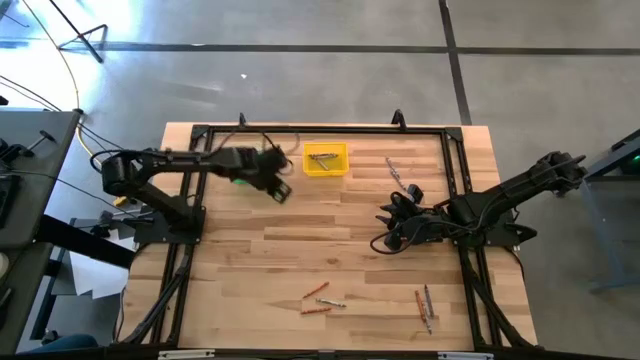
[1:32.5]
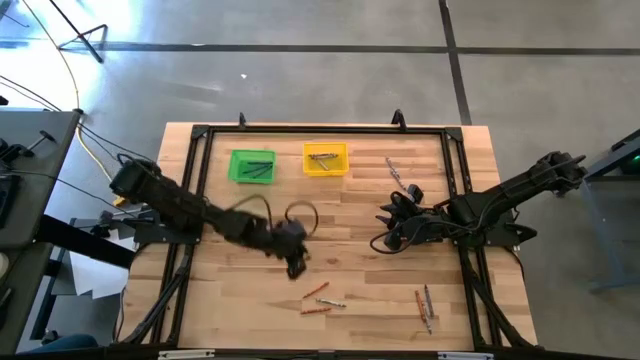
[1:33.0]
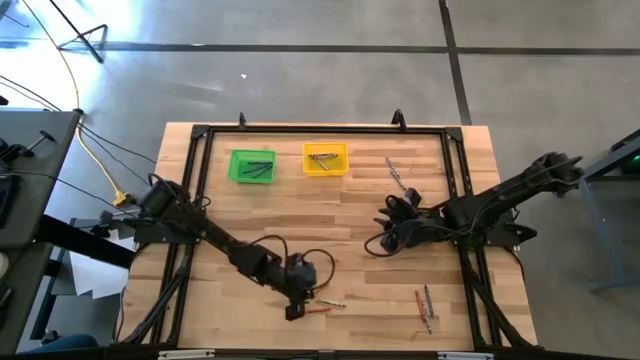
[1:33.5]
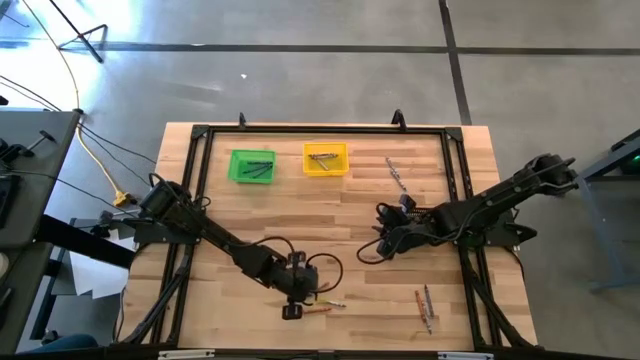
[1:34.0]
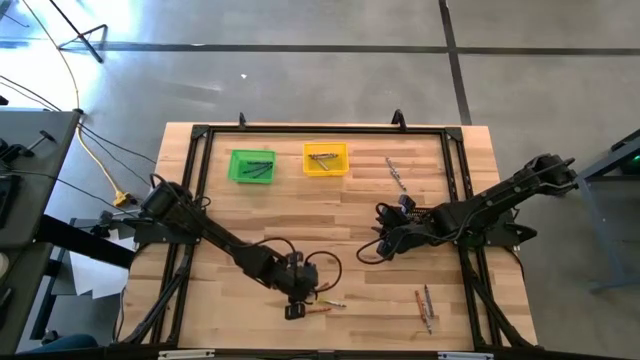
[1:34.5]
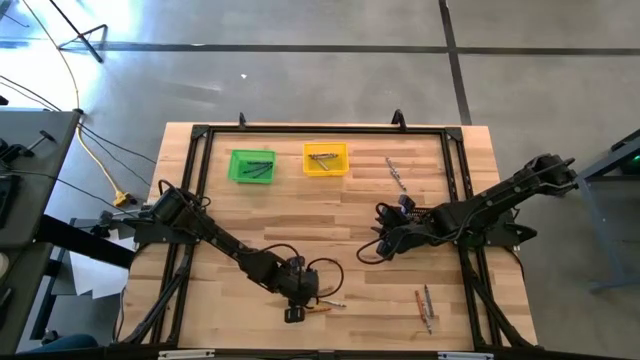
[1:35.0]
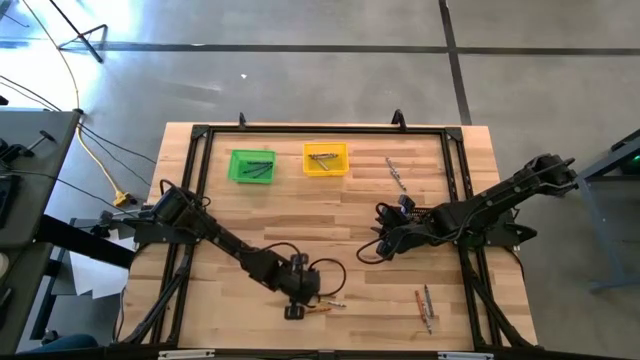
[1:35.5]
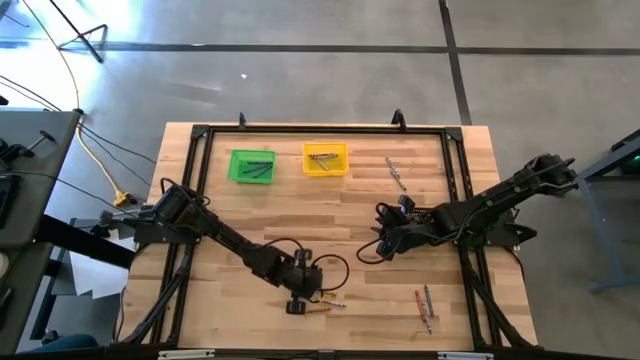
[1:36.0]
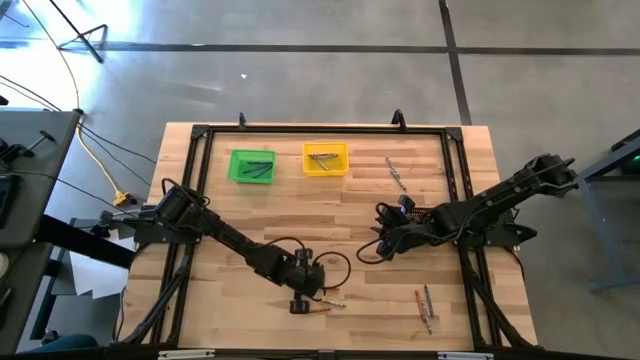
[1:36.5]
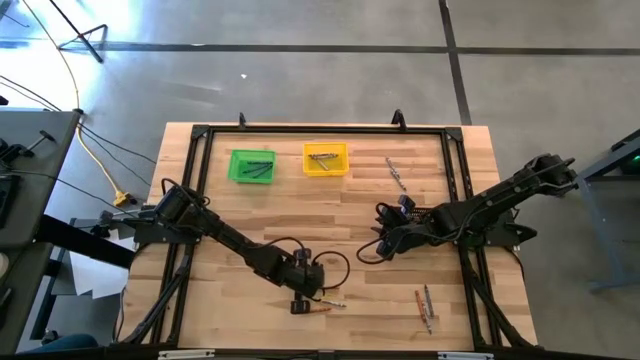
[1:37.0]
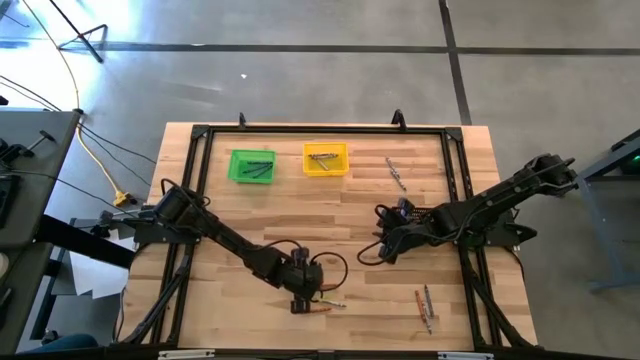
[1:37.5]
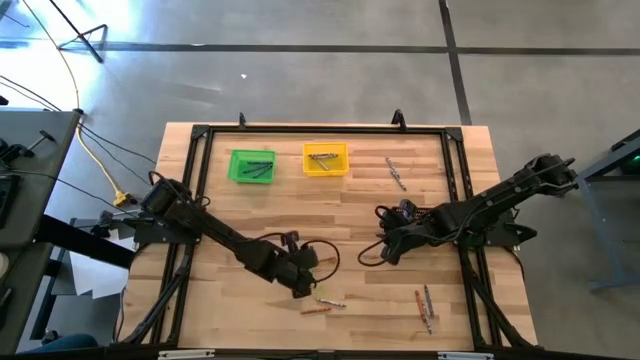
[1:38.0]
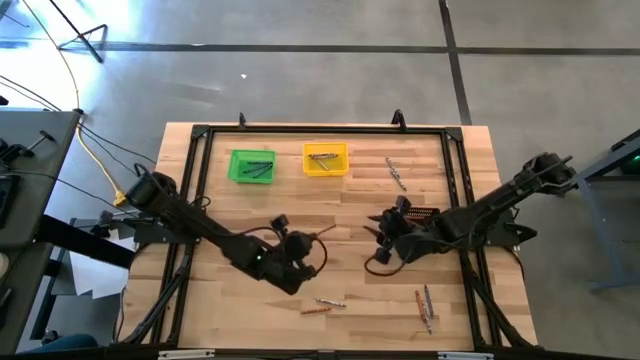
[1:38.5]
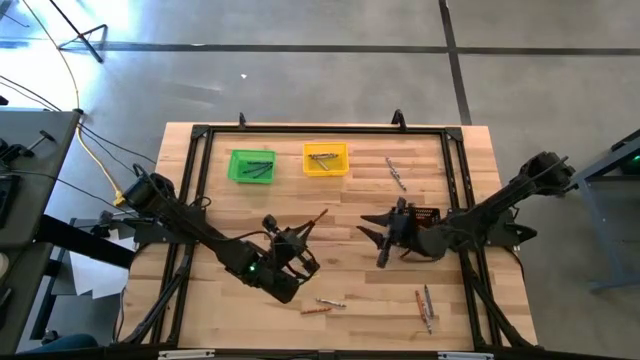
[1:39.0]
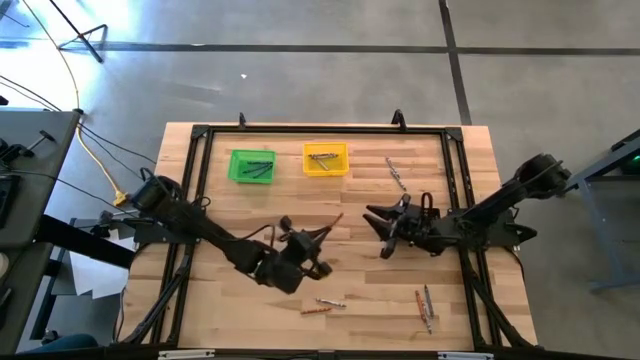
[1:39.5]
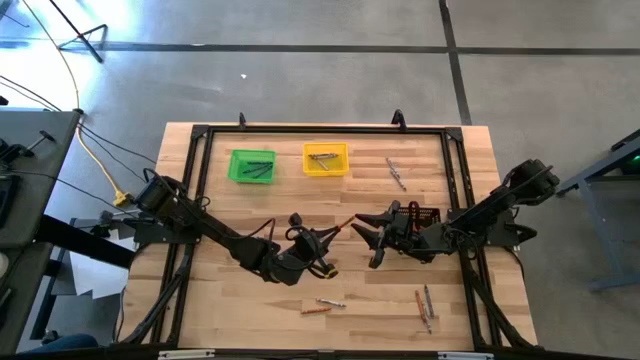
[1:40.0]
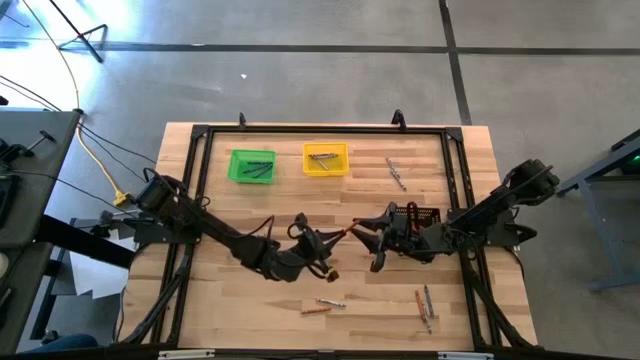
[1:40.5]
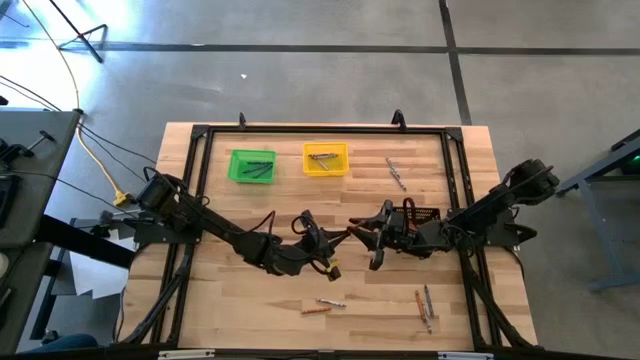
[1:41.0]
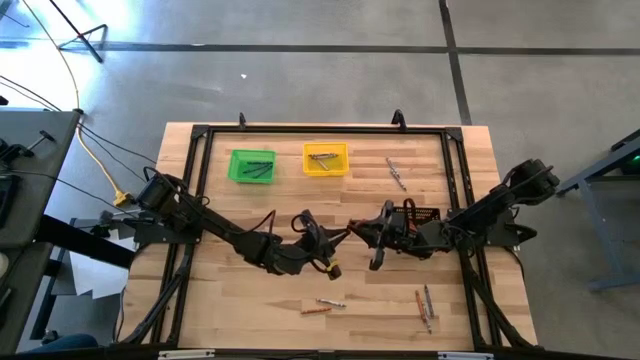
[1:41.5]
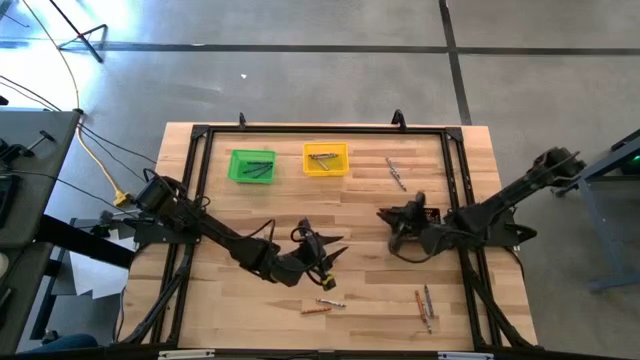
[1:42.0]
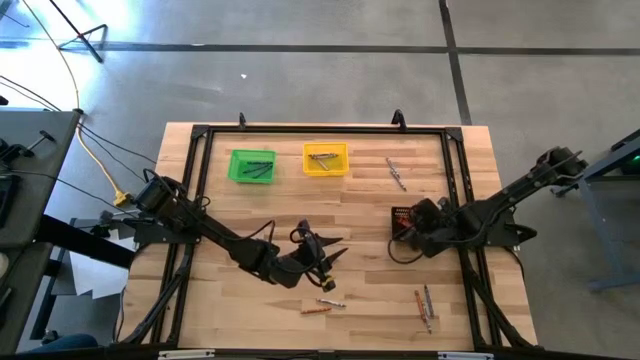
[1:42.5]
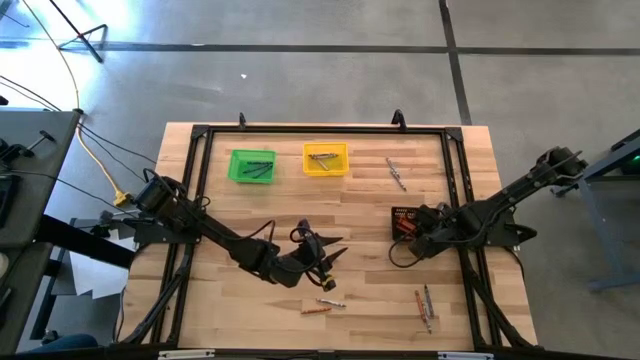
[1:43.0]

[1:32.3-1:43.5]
Task: Sort crayons
Put the orange crayon into the black bin

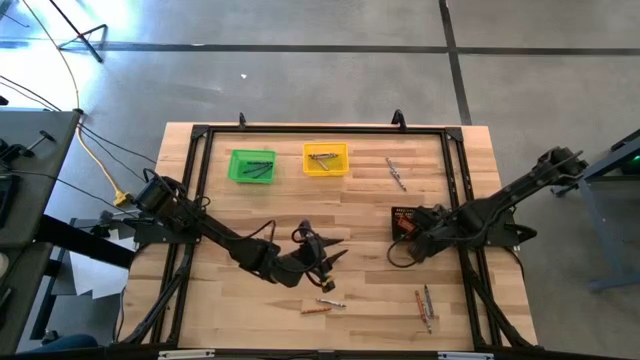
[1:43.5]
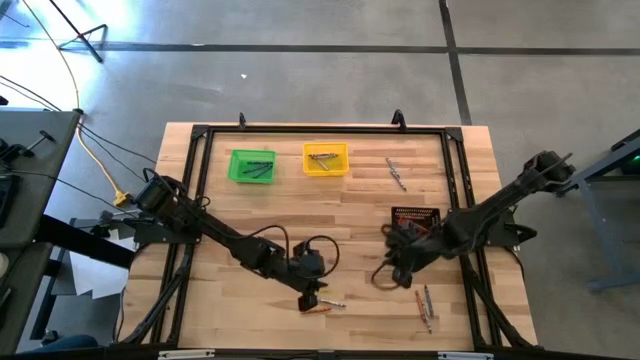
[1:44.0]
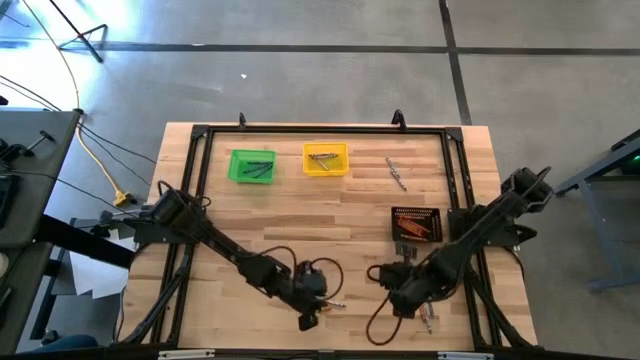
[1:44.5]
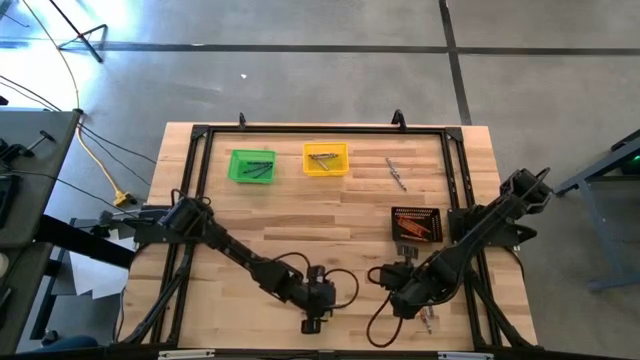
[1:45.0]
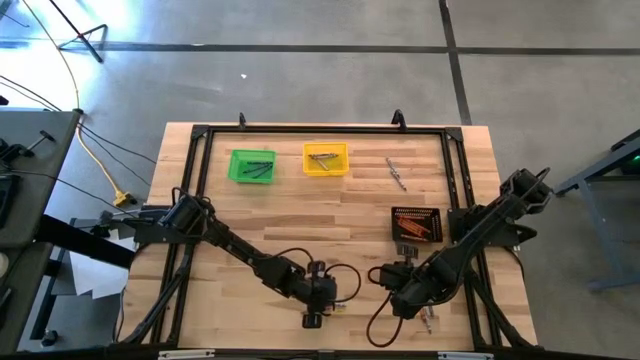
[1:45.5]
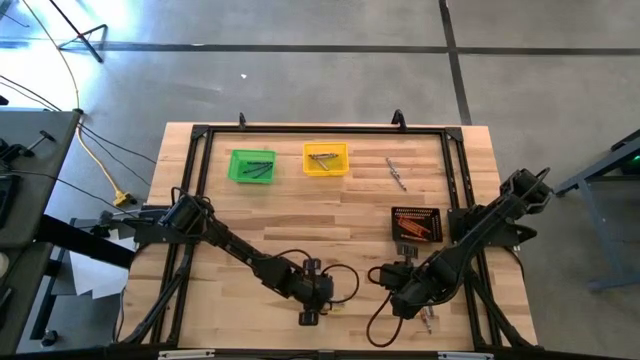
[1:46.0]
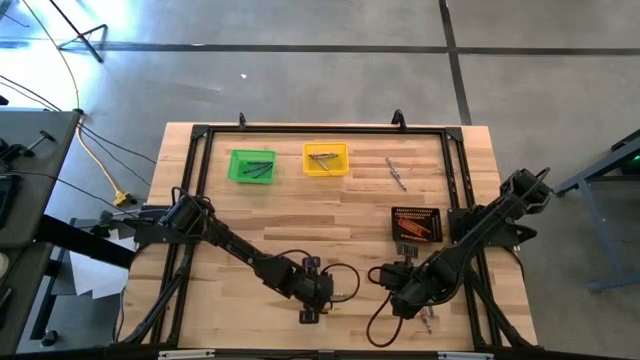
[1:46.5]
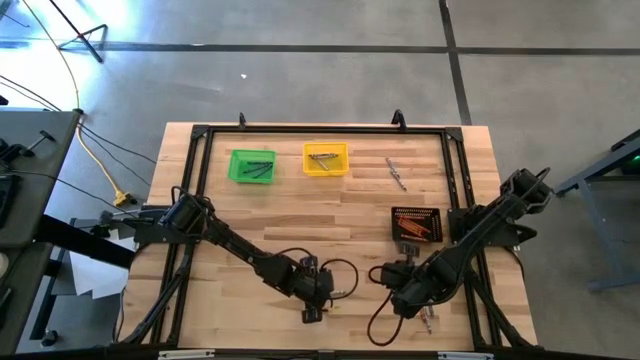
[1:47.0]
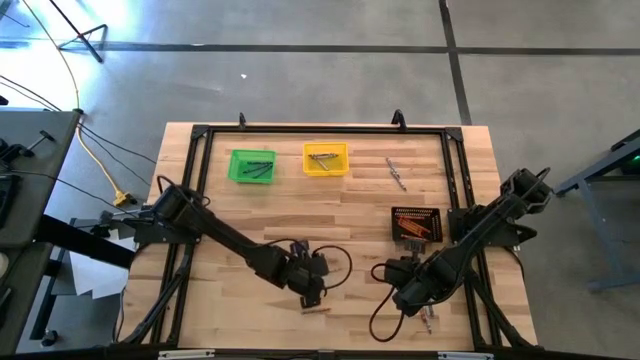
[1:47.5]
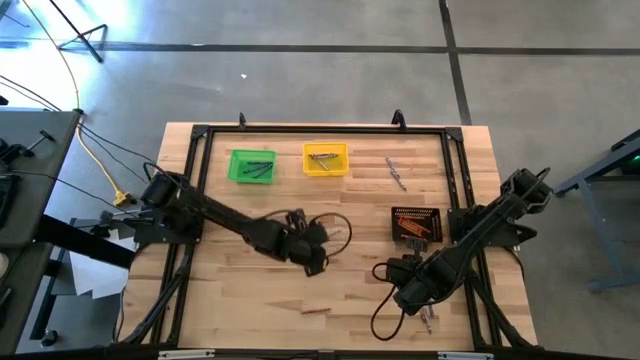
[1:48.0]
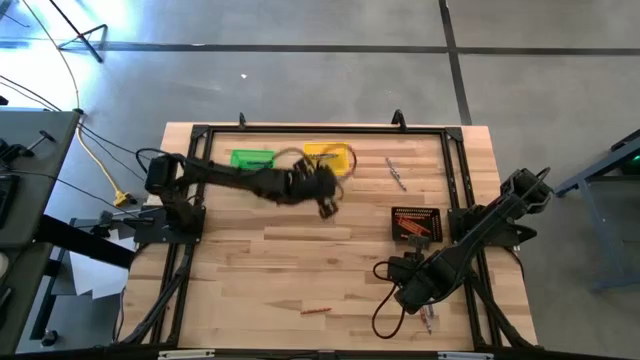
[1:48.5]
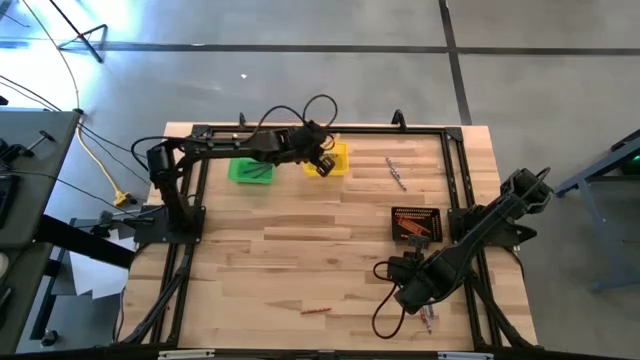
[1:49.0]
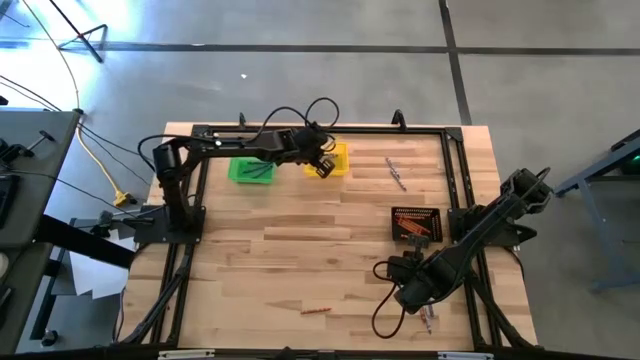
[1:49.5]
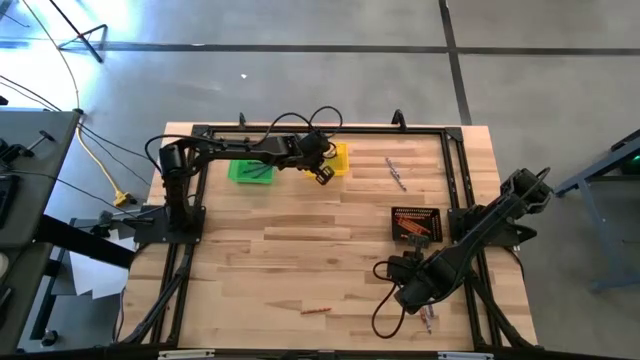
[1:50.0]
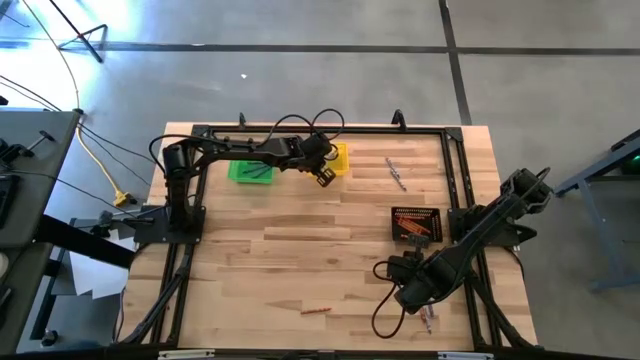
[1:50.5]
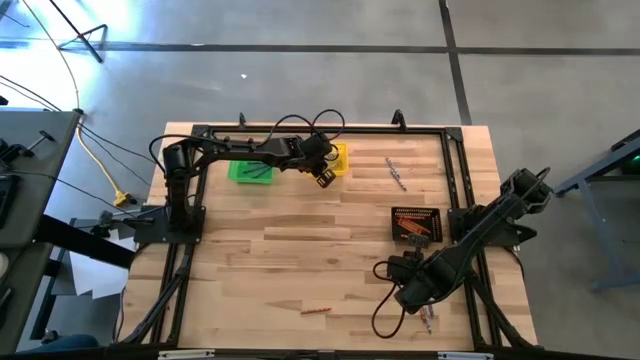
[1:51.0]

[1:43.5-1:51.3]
Put the gray crayon into the yellow bin

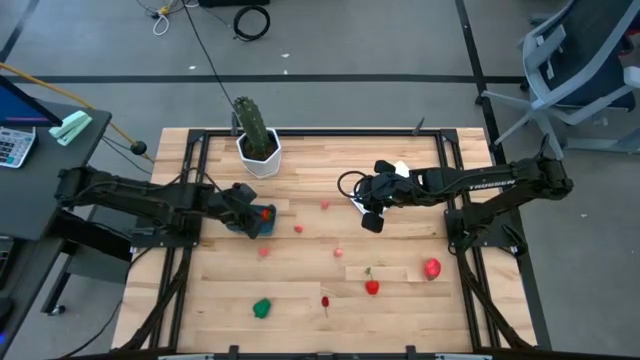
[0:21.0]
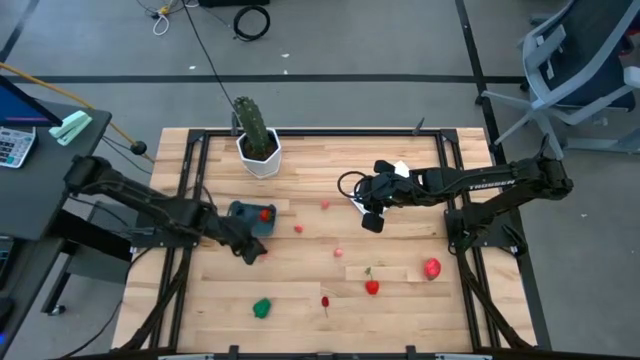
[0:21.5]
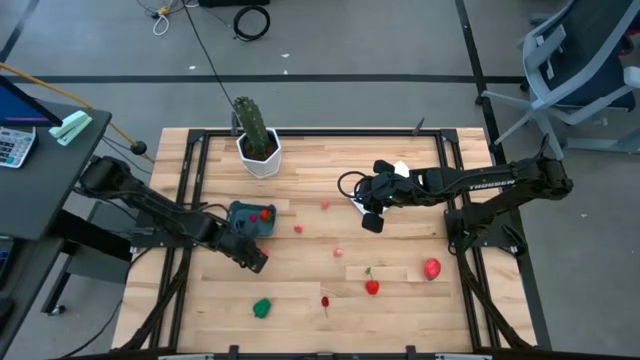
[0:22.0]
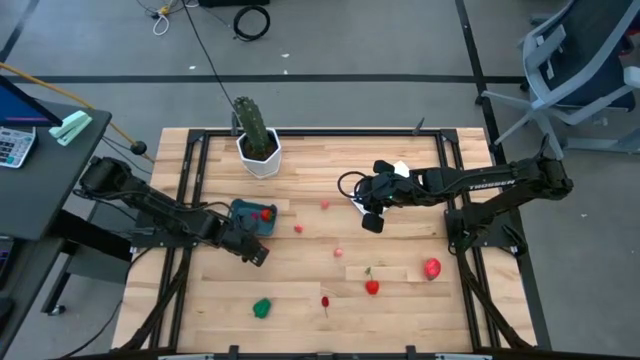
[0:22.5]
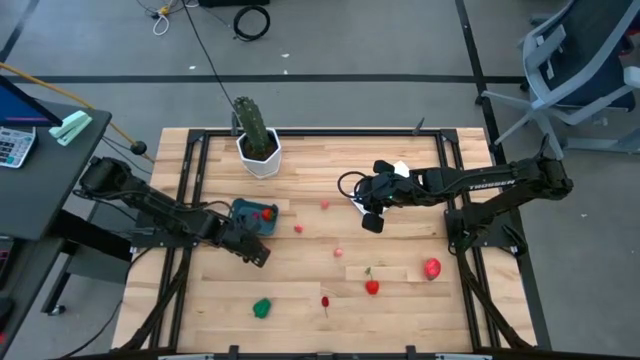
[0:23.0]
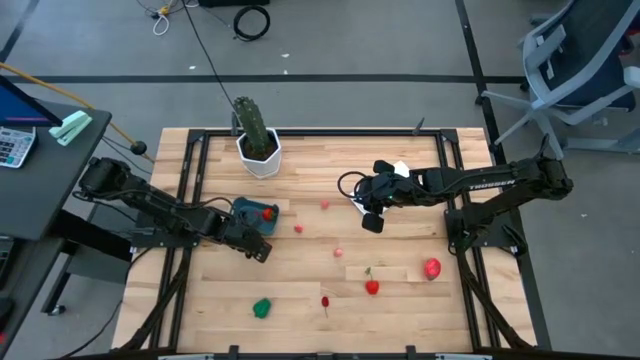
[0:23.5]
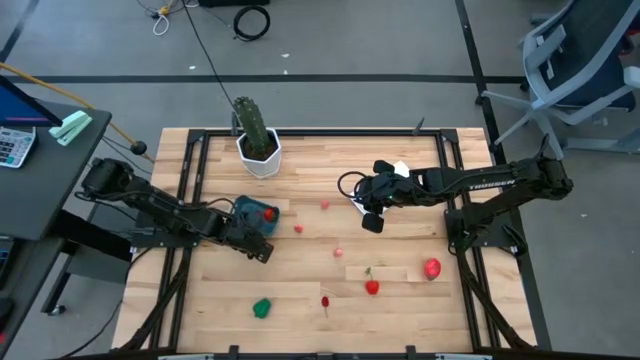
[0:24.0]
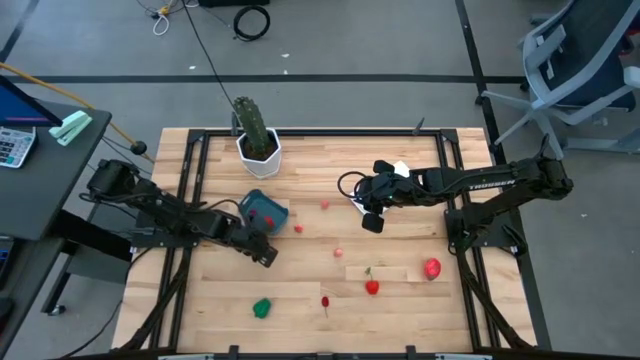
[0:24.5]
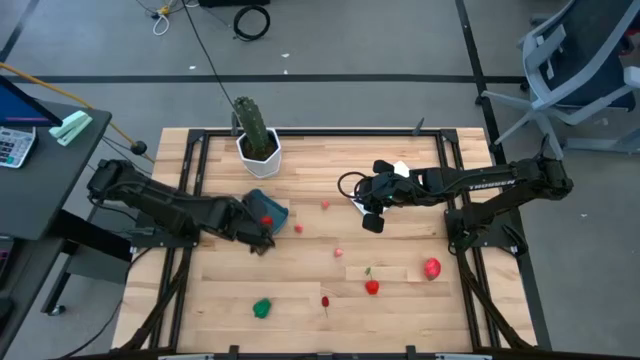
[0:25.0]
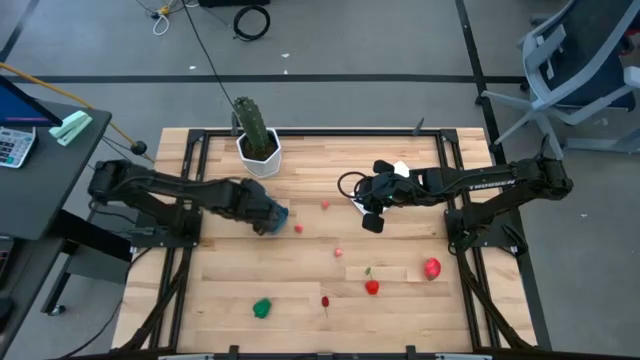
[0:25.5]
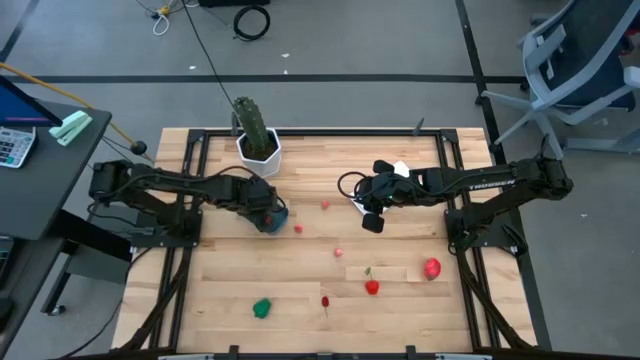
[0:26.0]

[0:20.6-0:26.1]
Task: Pick and placing Produce into tupperware
Put the bottom left pink peach into the blue bin
